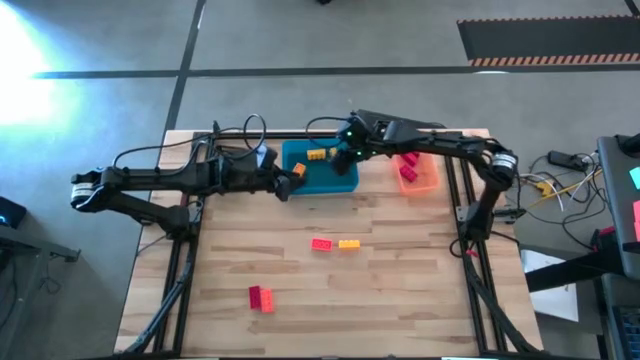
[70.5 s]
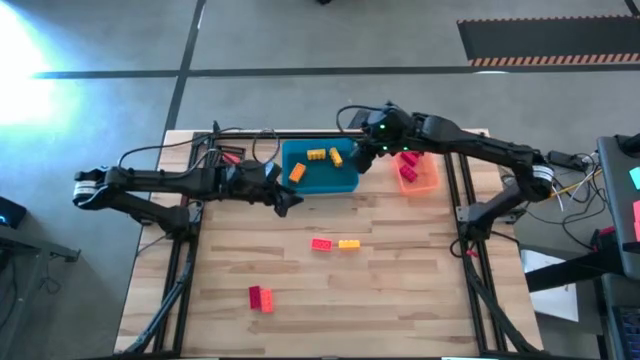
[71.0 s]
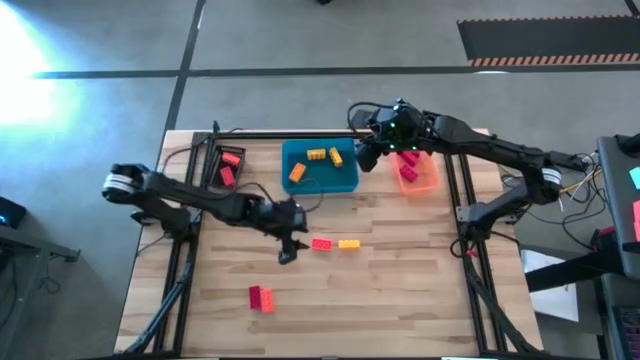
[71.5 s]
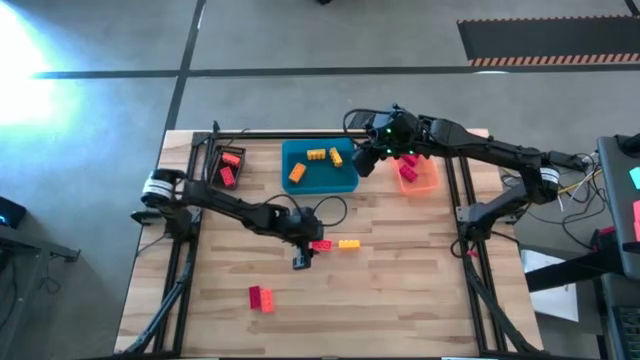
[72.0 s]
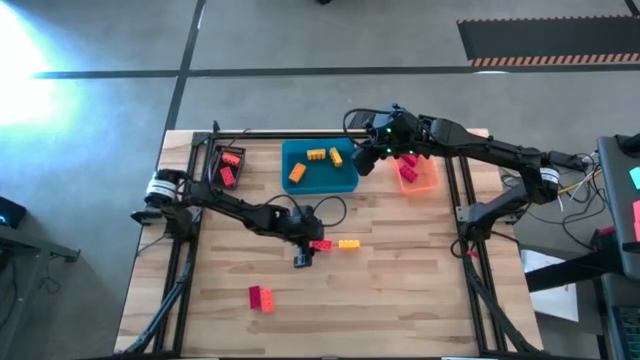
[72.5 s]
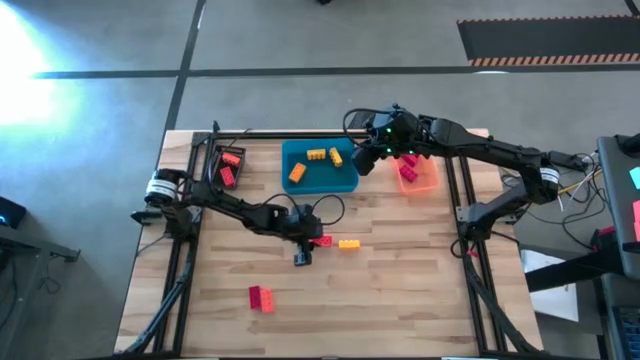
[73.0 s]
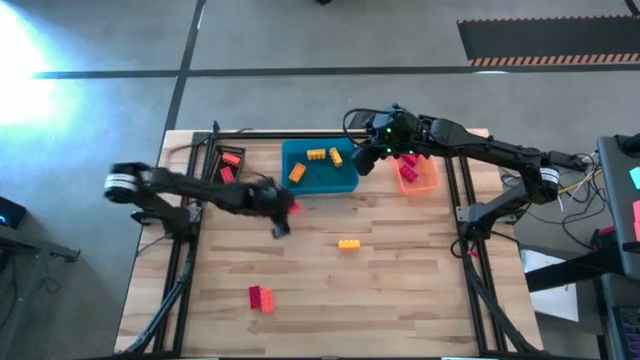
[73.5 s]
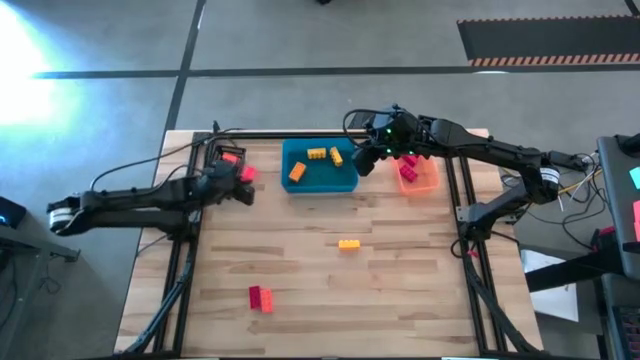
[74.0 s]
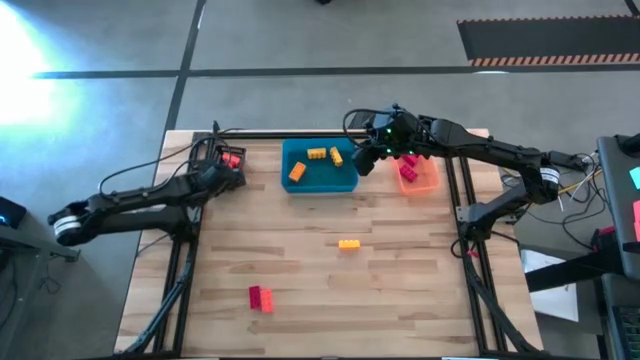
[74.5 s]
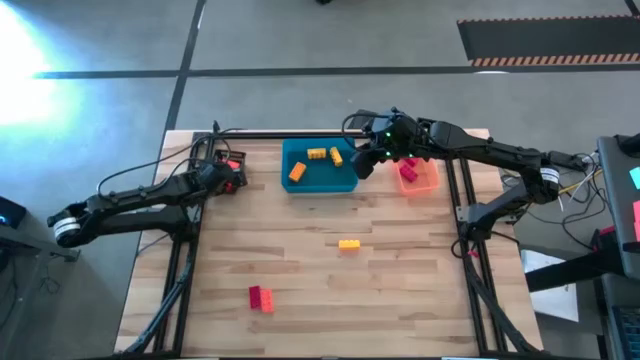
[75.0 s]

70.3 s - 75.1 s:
Task: Sort & place blocks by color
Put the orange game piece into the black bin

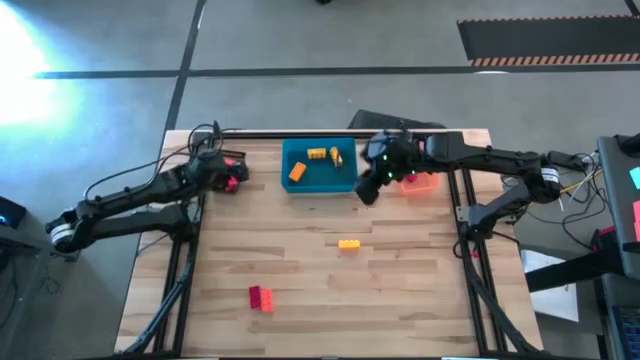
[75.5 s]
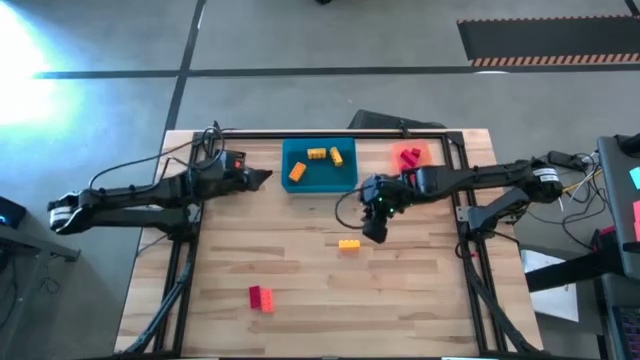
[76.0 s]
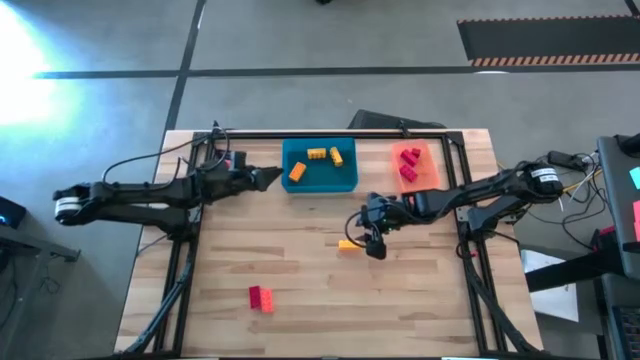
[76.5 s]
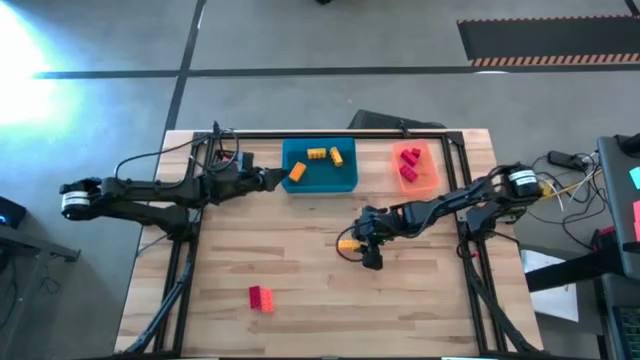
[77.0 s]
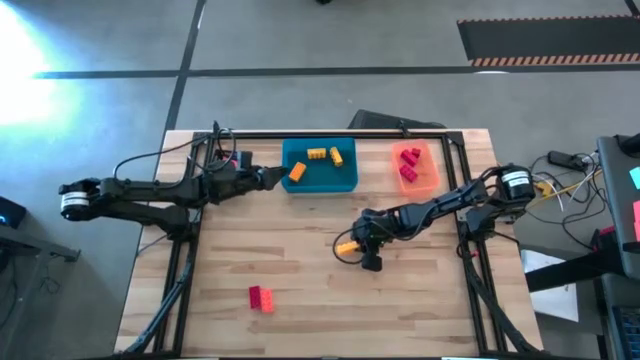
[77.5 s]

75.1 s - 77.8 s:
Put the yellow game piece into the blue bin

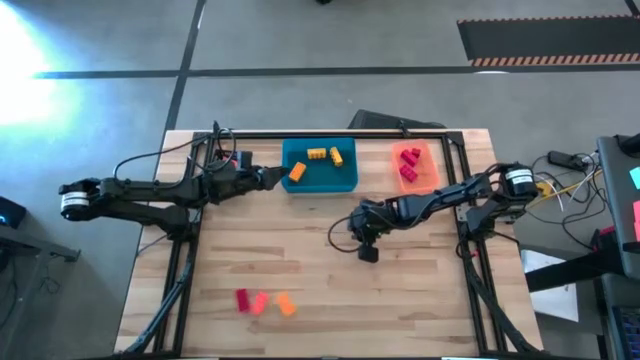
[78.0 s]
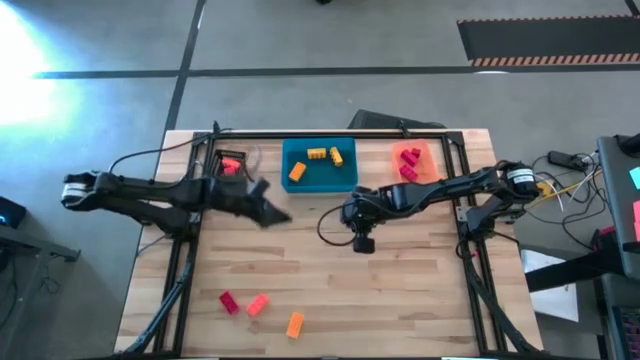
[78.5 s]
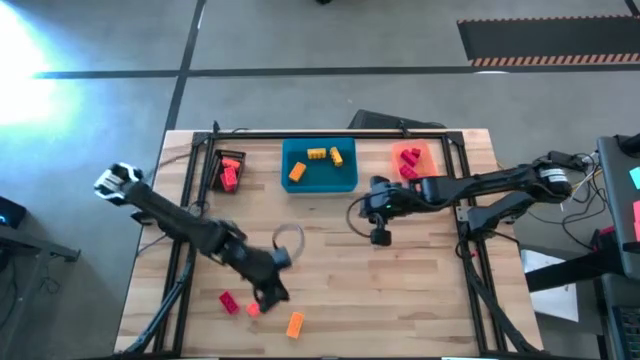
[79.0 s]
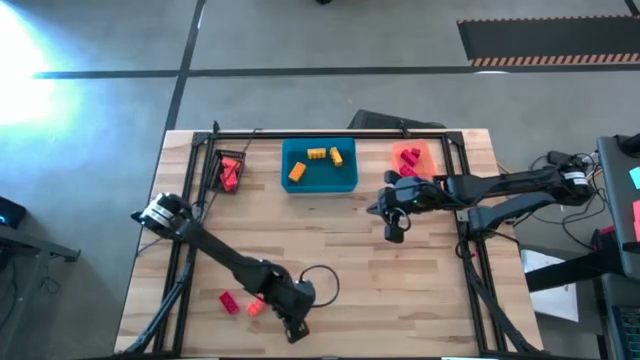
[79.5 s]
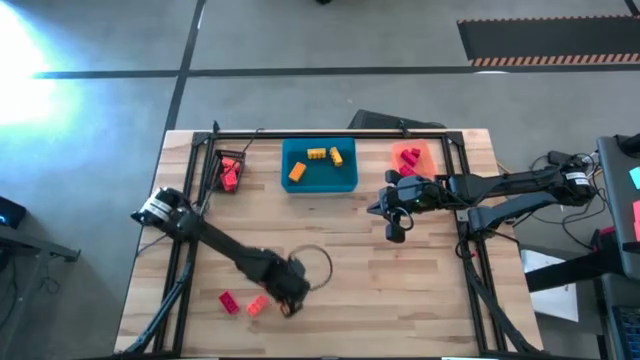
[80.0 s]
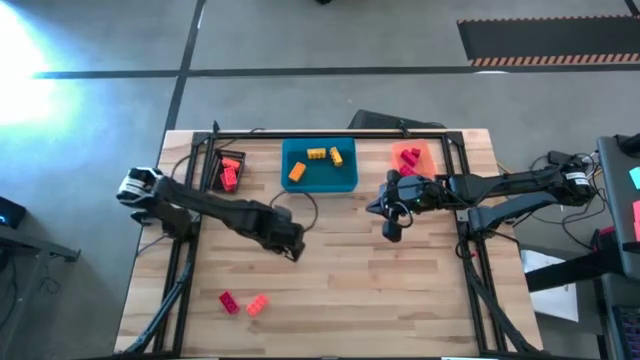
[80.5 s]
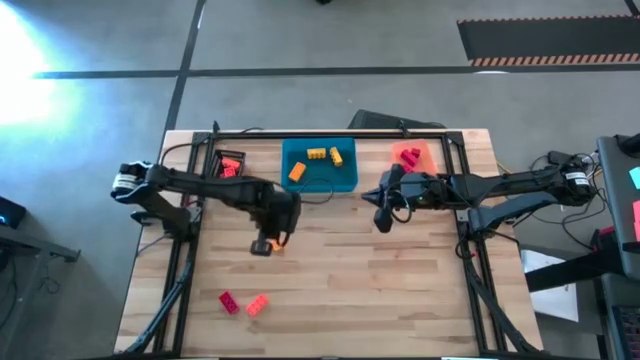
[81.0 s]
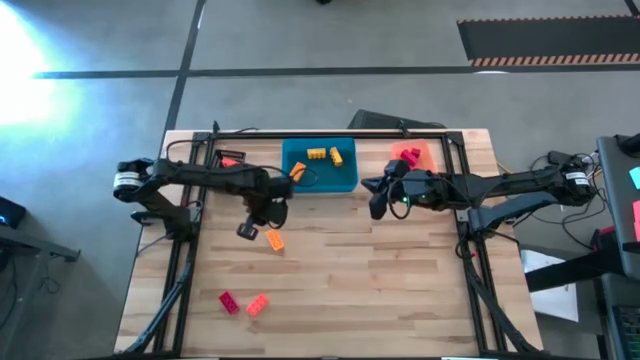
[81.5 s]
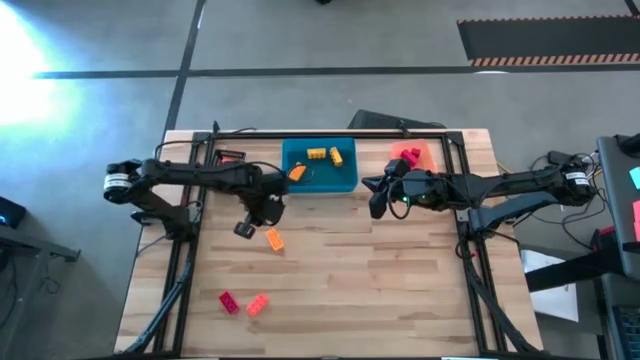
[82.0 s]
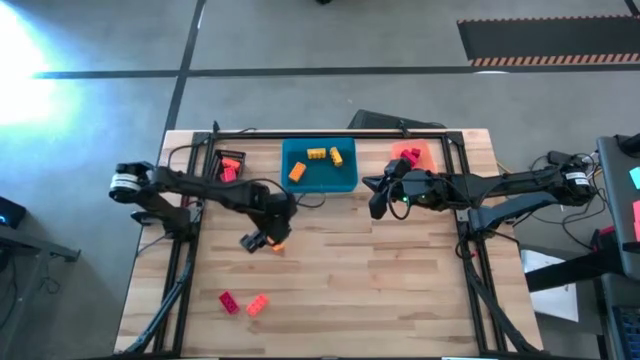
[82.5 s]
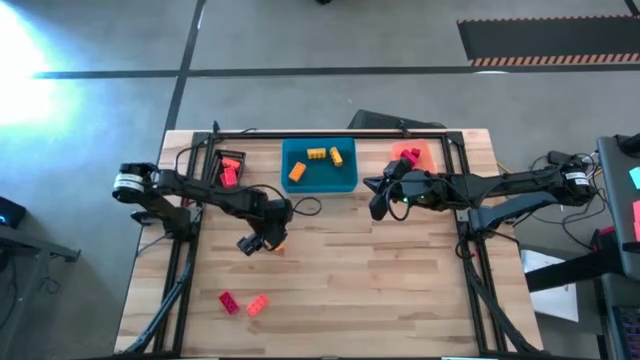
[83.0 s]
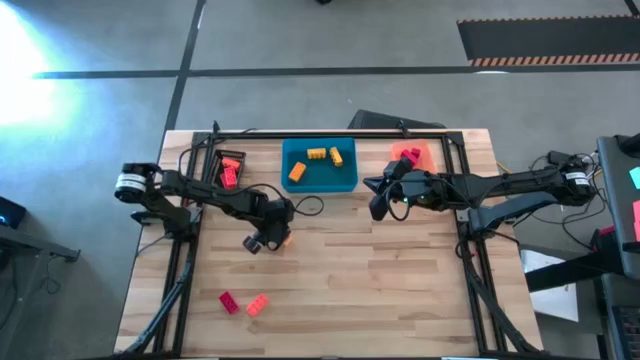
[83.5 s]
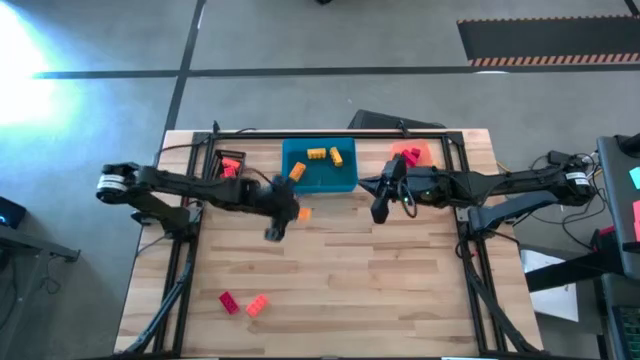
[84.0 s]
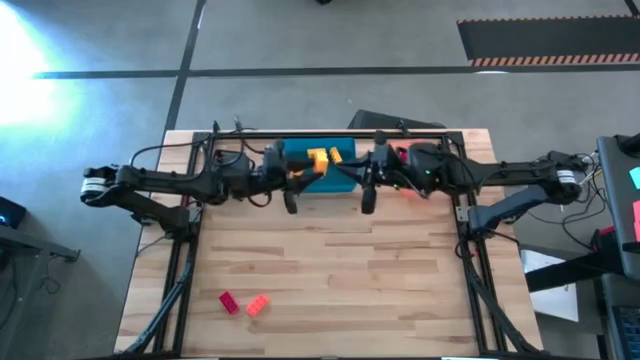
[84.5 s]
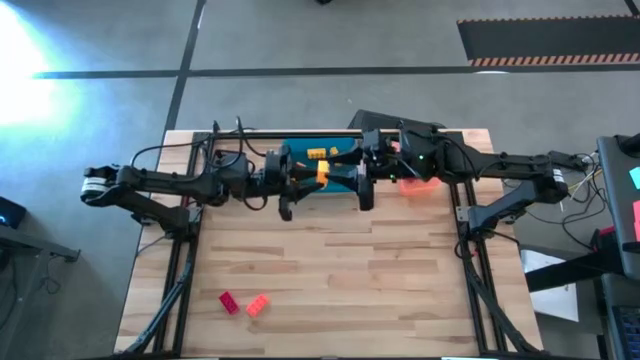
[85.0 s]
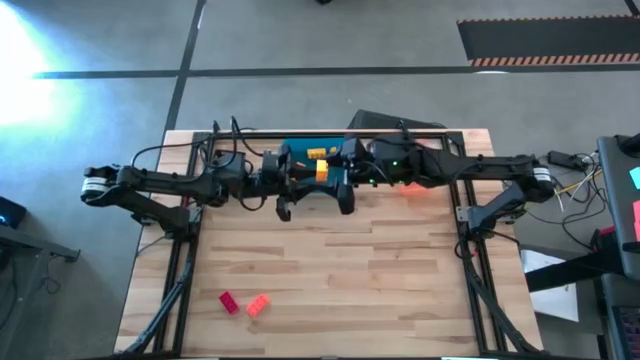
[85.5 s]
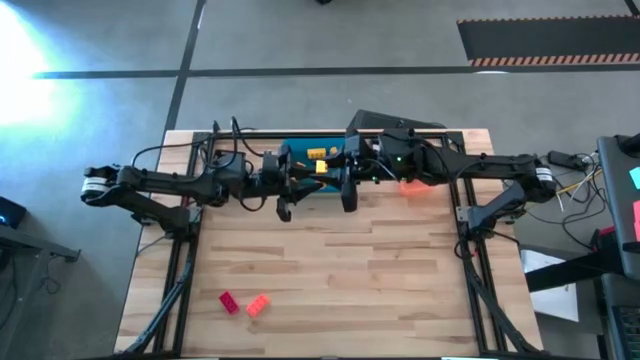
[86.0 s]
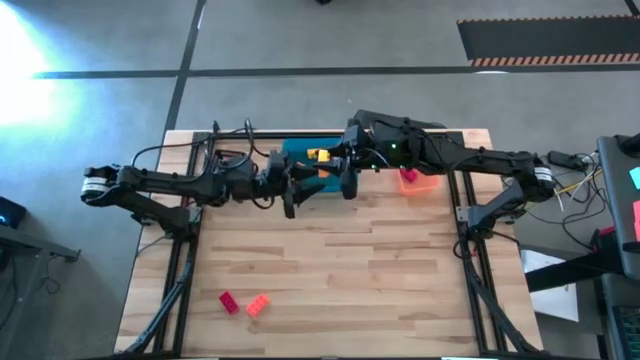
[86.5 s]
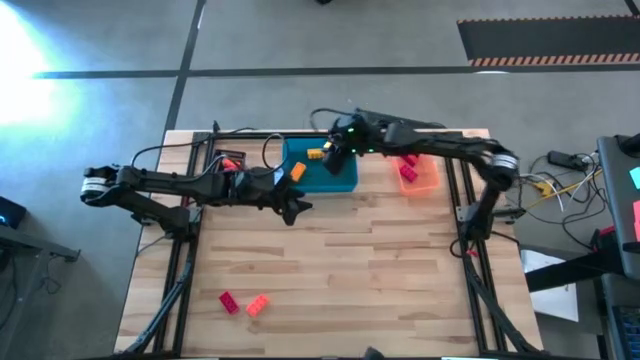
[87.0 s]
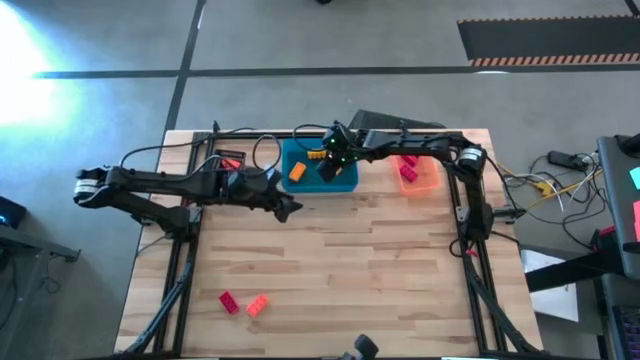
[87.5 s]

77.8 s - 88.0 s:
Put the yellow game piece into the blue bin

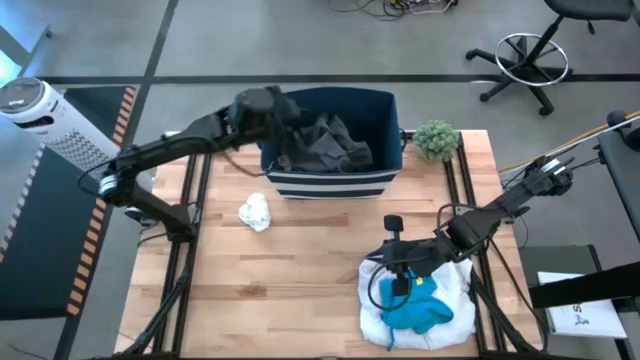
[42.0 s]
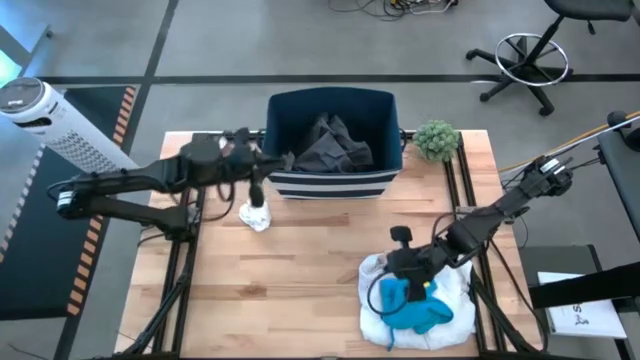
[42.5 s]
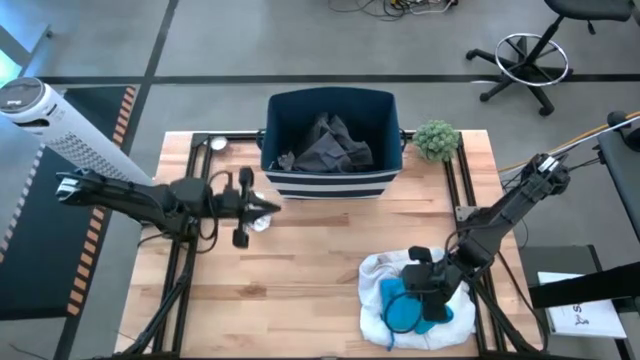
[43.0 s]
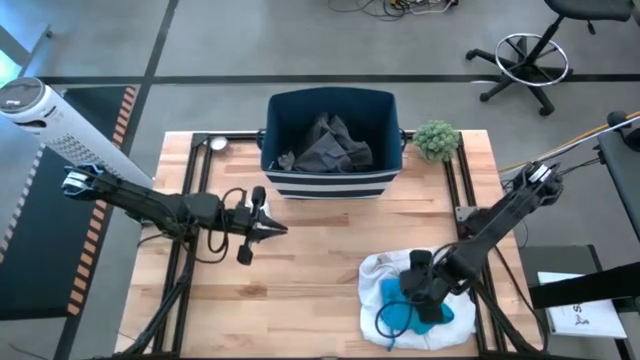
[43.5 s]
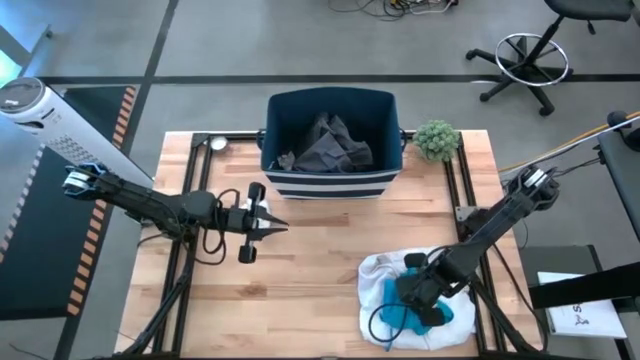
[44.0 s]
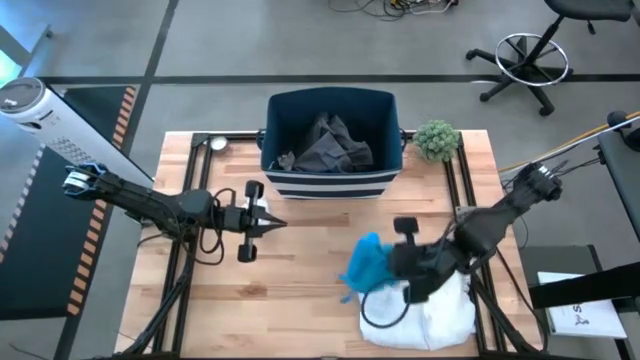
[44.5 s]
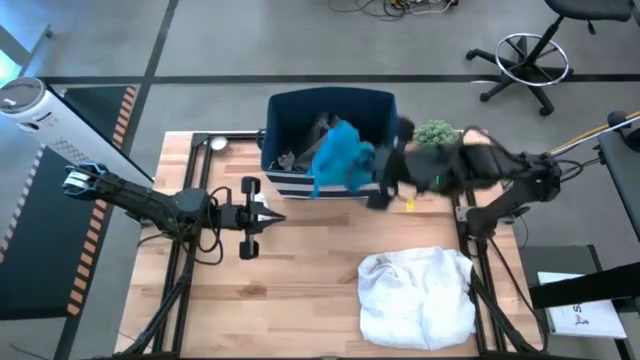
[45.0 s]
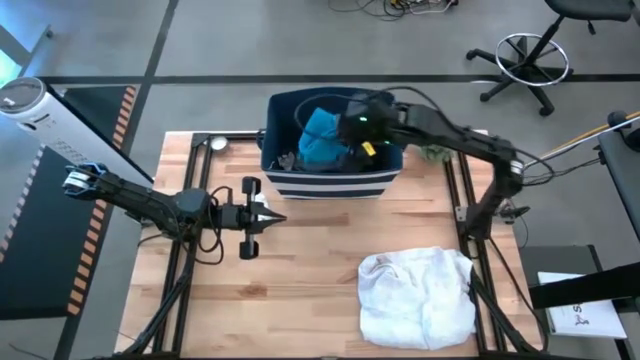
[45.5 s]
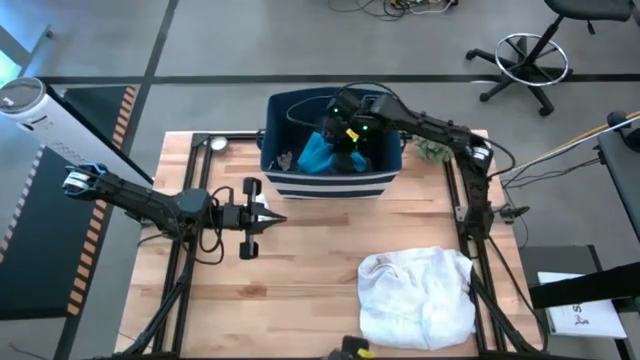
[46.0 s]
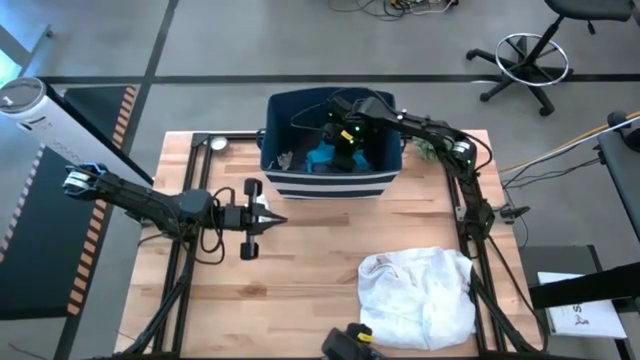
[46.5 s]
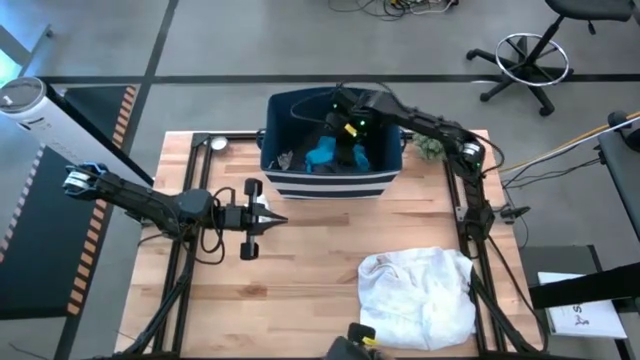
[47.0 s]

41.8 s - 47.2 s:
Task: Sort clothes
Put the blue shorts into the laundry organizer
